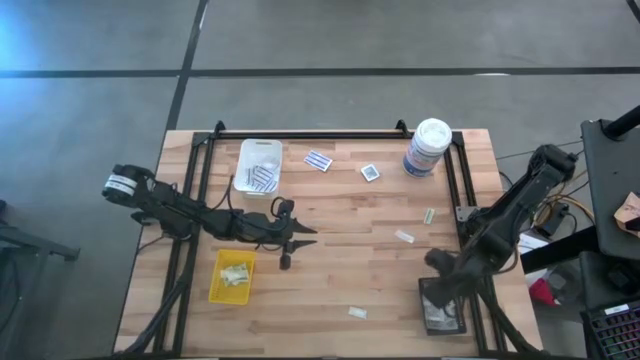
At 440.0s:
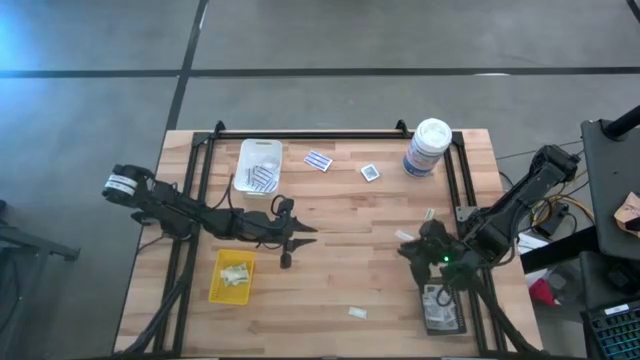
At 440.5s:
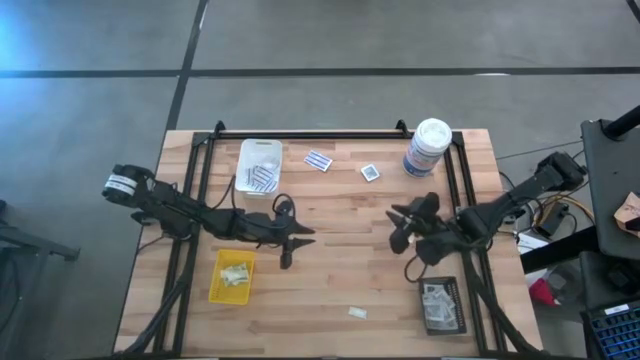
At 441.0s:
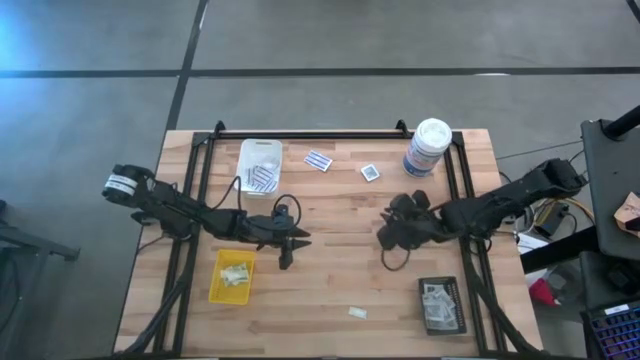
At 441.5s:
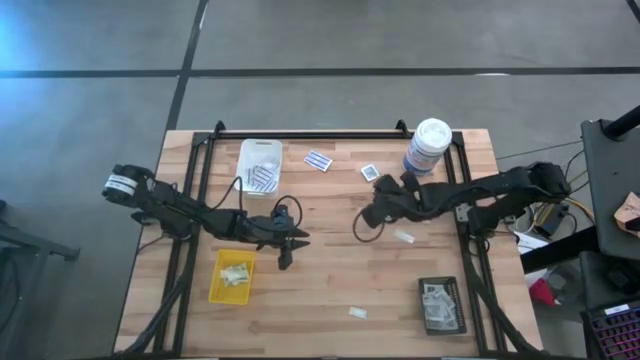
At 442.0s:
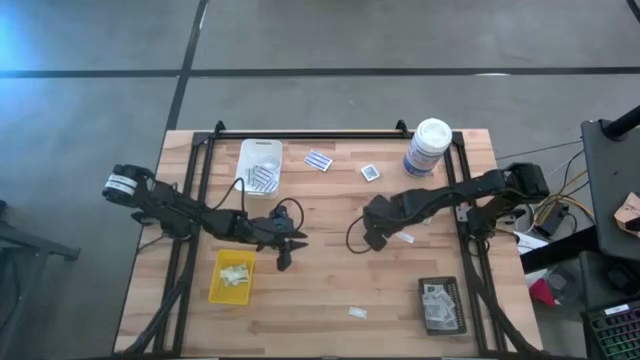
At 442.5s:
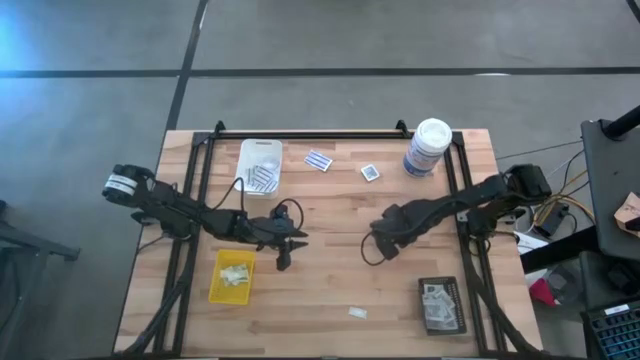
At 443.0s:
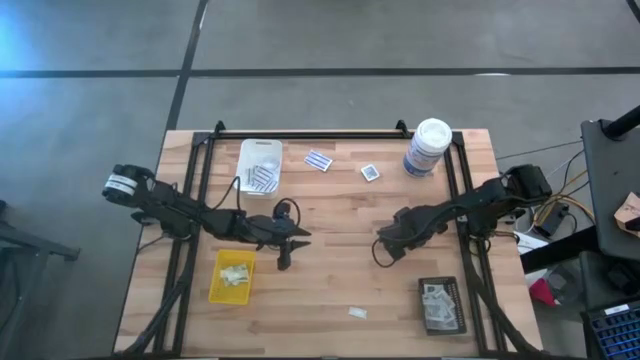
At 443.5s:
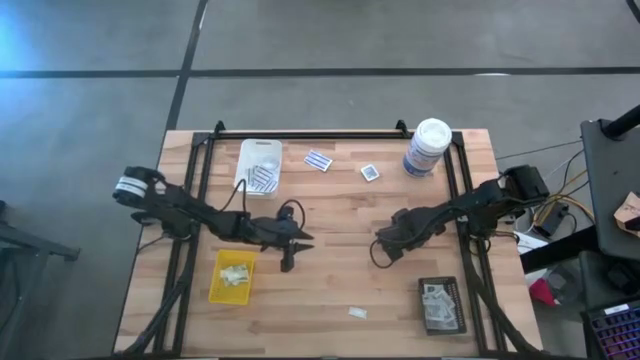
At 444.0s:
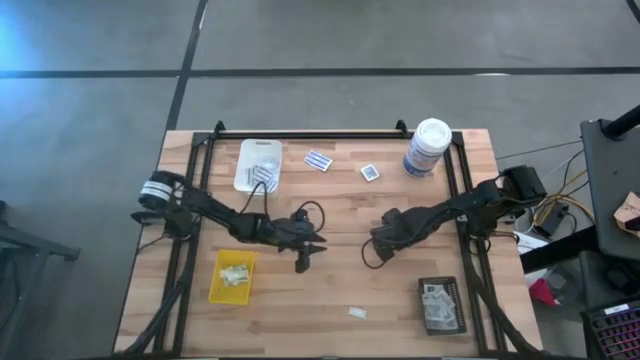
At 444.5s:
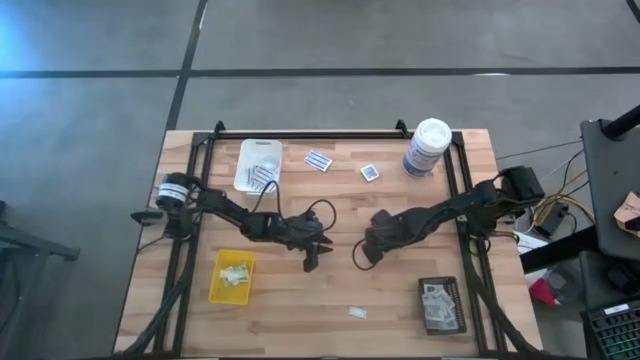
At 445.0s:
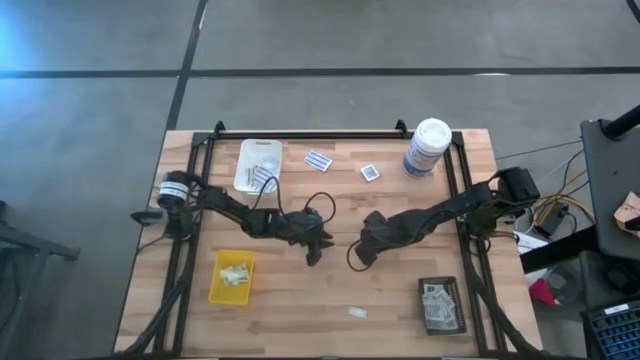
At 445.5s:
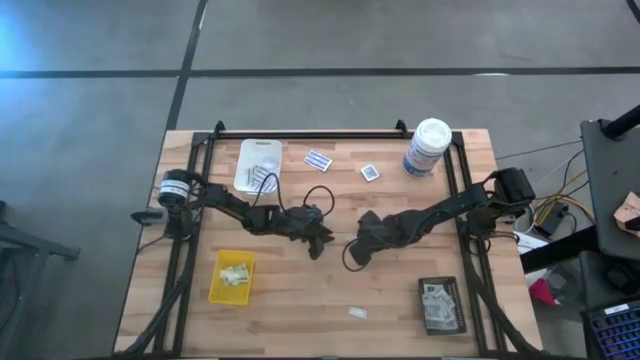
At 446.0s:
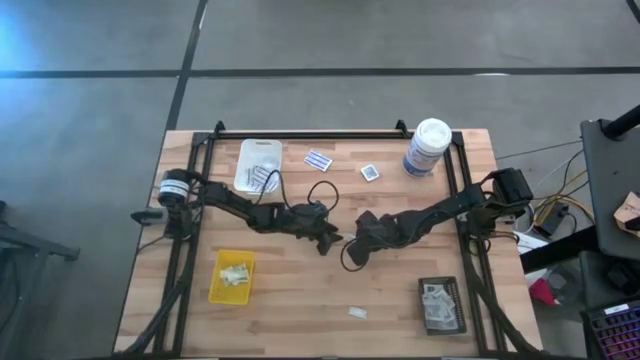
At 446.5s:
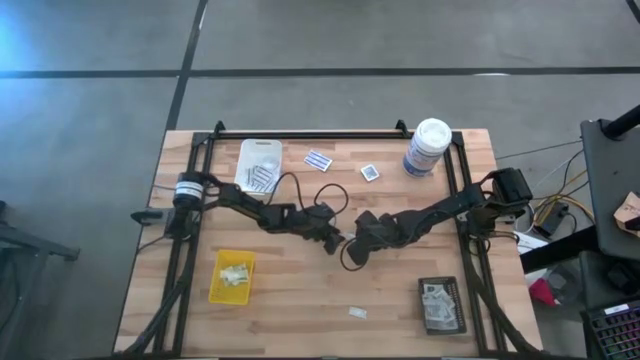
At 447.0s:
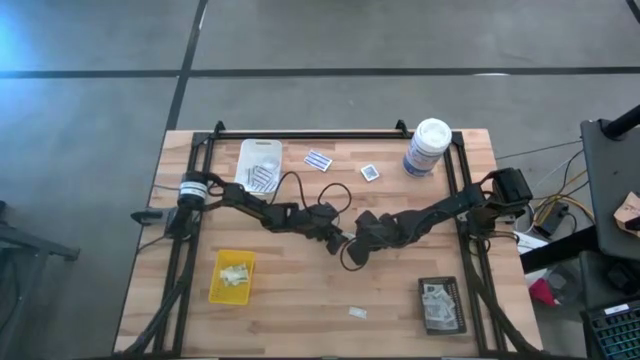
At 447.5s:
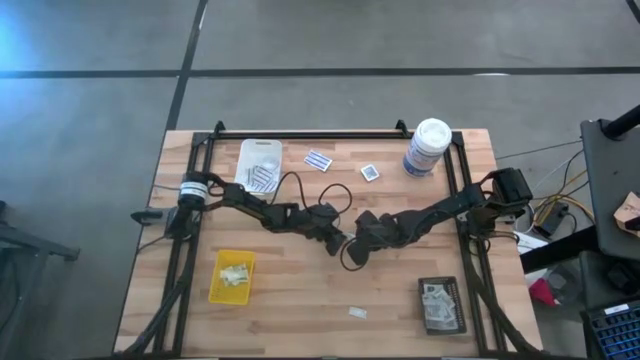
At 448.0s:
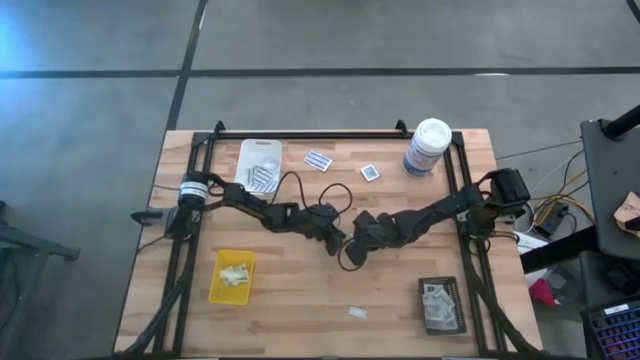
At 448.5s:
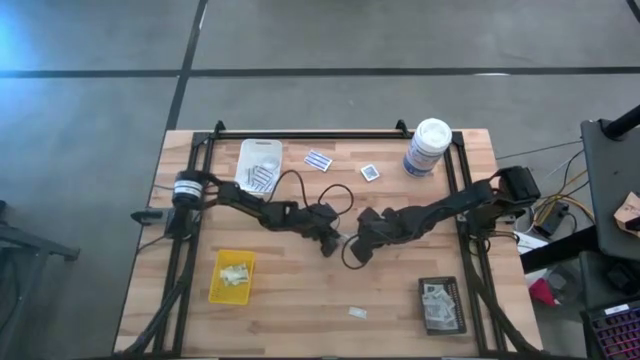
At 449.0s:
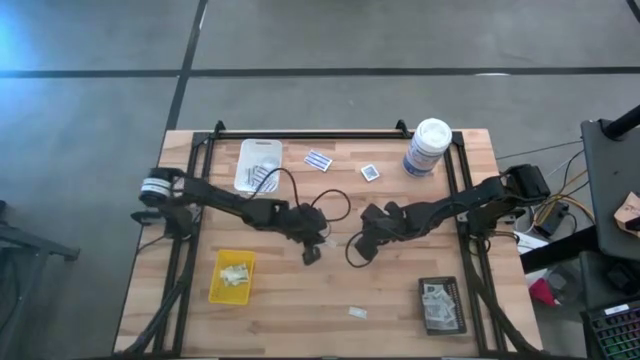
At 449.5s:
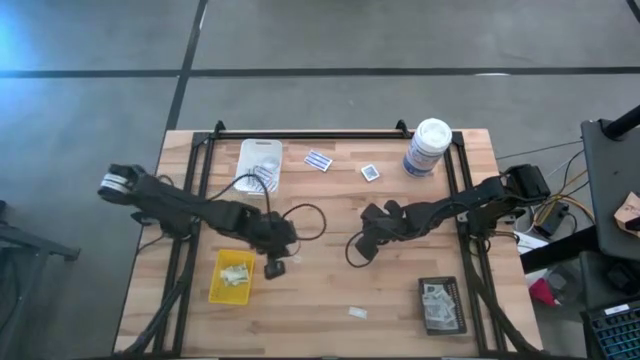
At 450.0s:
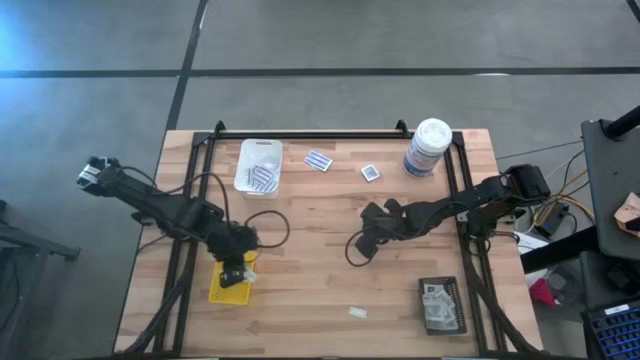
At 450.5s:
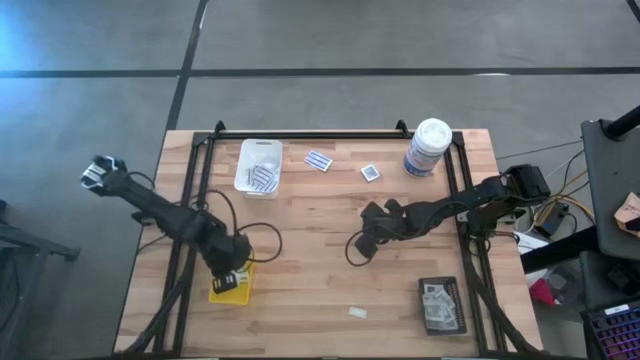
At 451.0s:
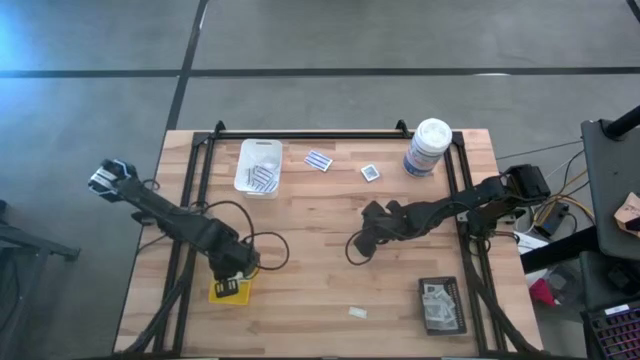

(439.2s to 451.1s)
Task: Pick & Place First Aid Supplies
Put the green bandage into the yellow bin

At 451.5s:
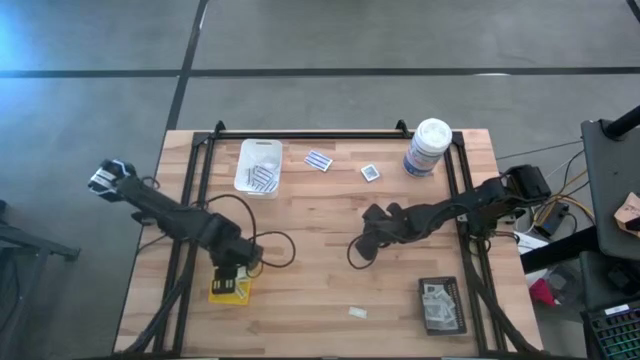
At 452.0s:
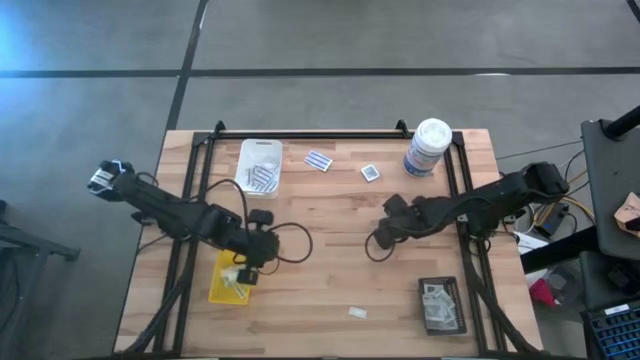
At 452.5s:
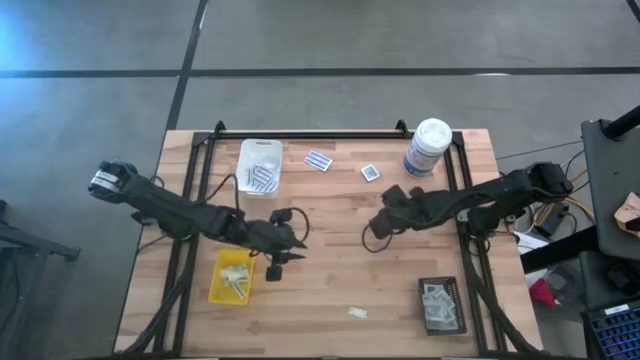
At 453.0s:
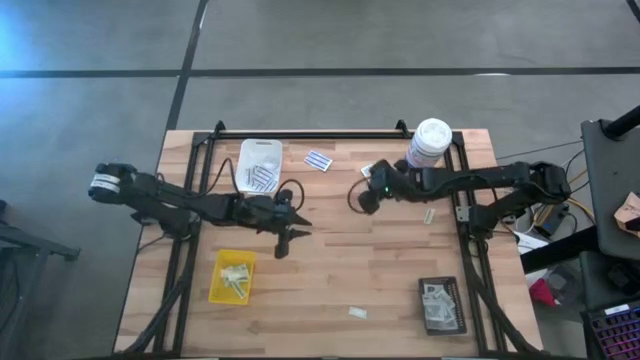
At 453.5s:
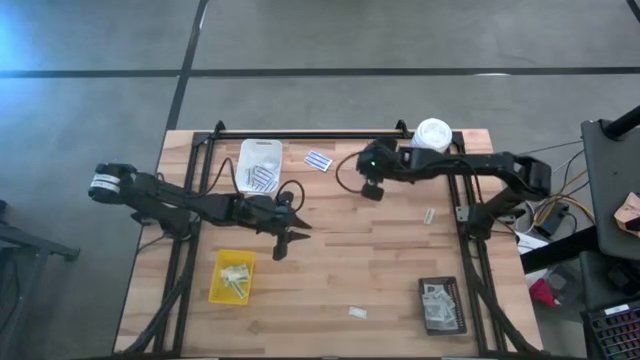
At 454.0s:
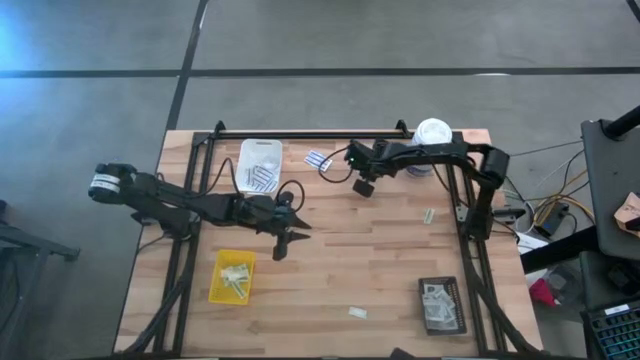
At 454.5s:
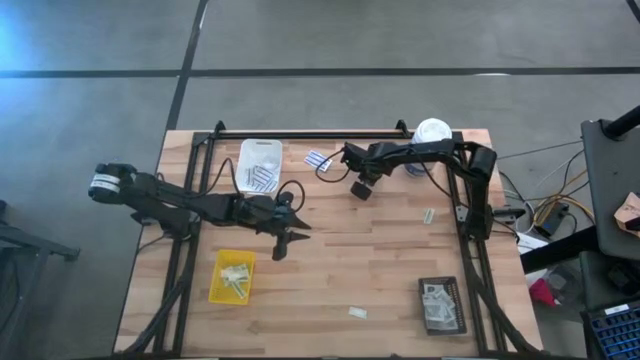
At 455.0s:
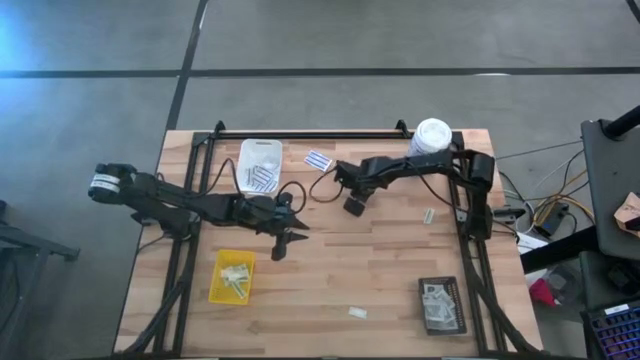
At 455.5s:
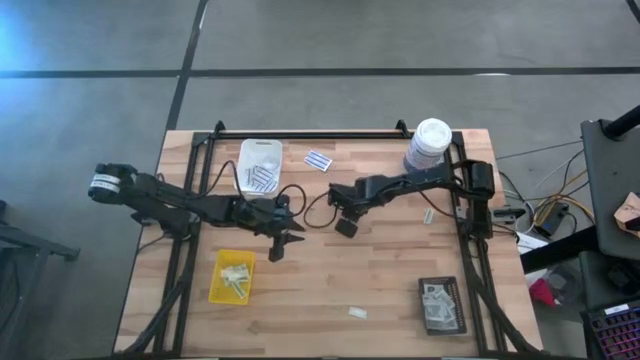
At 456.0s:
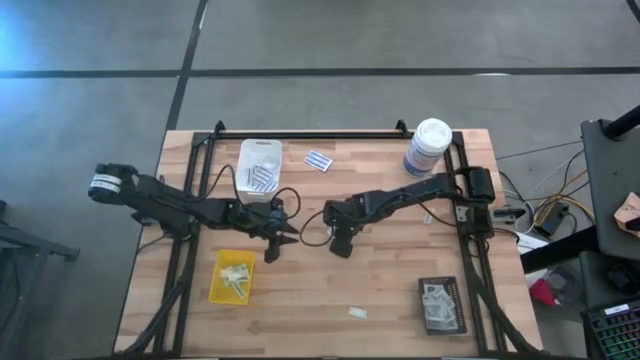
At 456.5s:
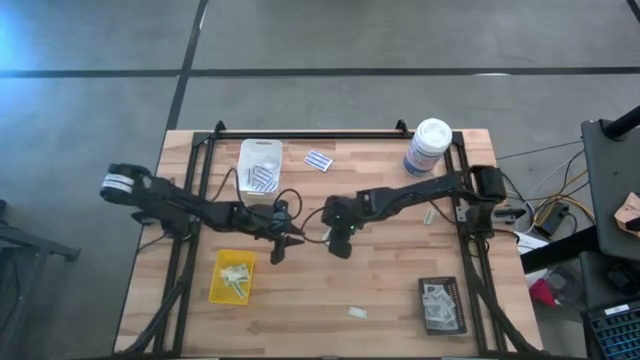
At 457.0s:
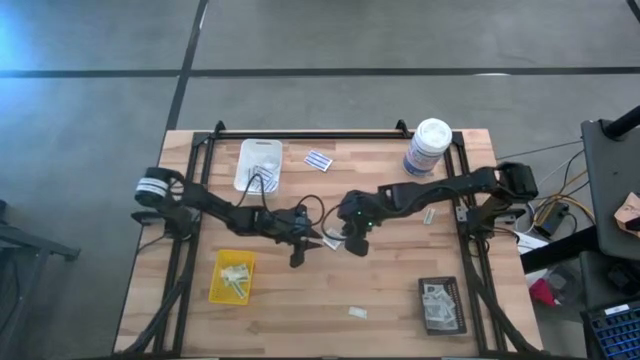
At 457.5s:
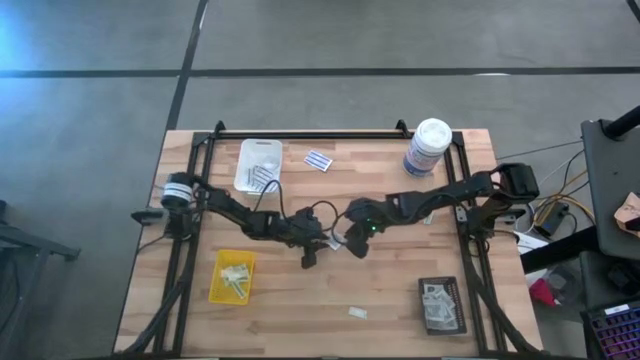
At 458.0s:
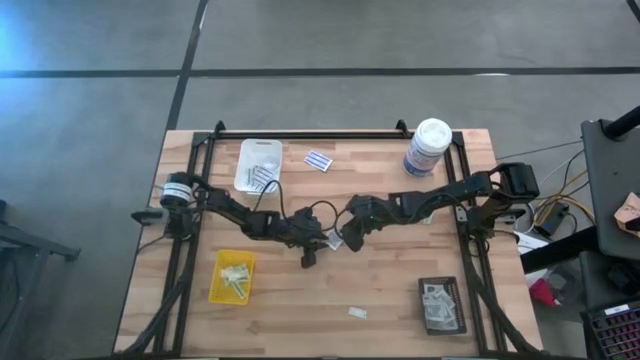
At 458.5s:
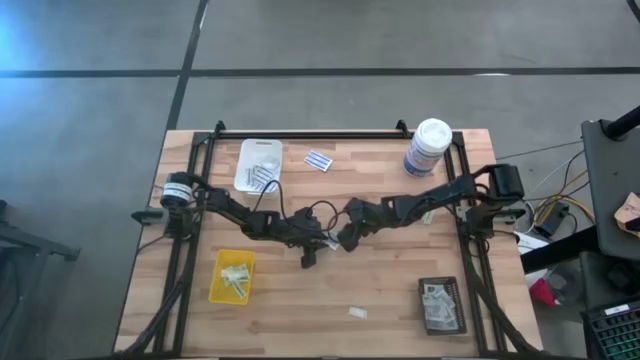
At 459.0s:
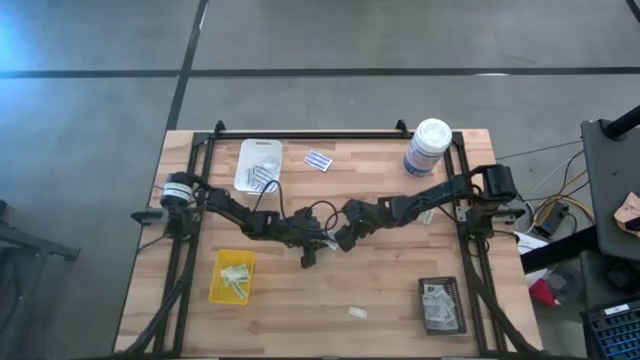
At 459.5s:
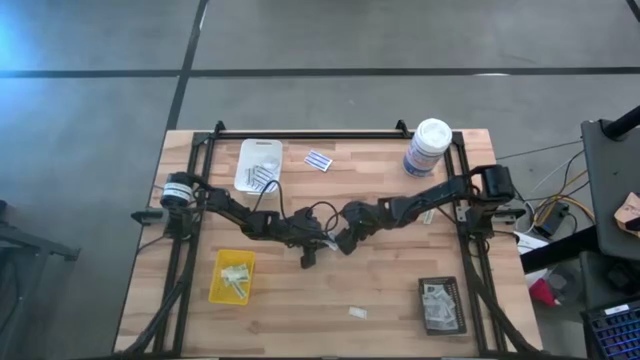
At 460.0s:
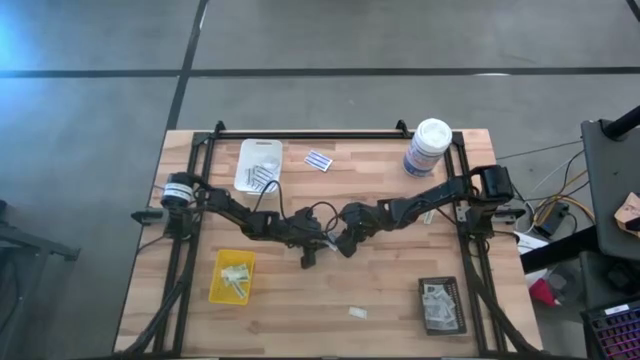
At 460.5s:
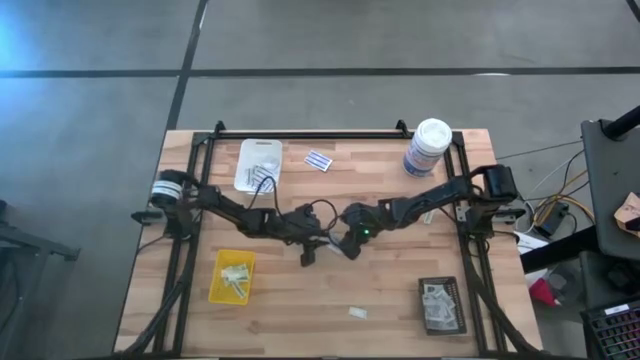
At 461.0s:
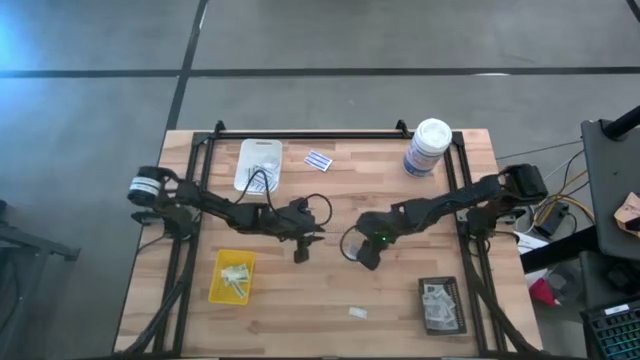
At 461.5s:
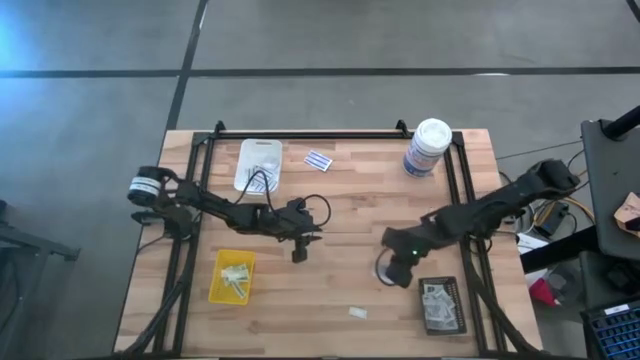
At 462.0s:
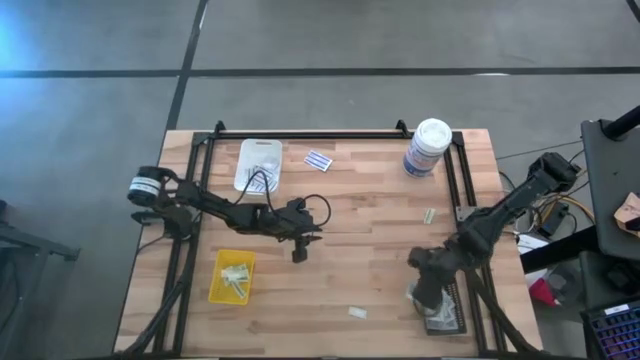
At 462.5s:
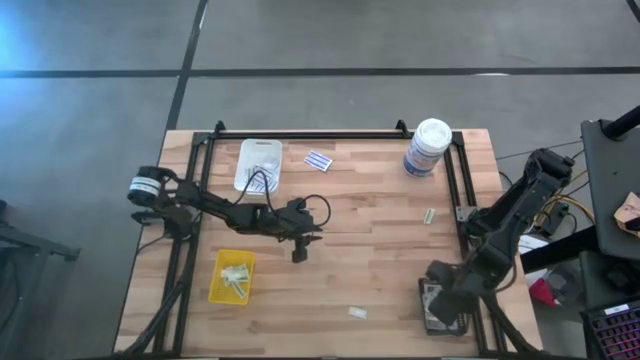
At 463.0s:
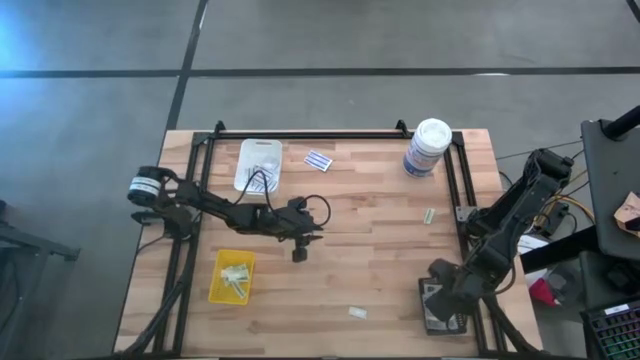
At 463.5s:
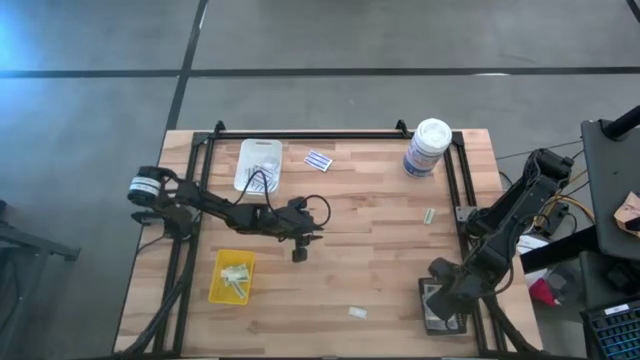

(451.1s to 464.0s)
Put the towelette pack into the black bin
